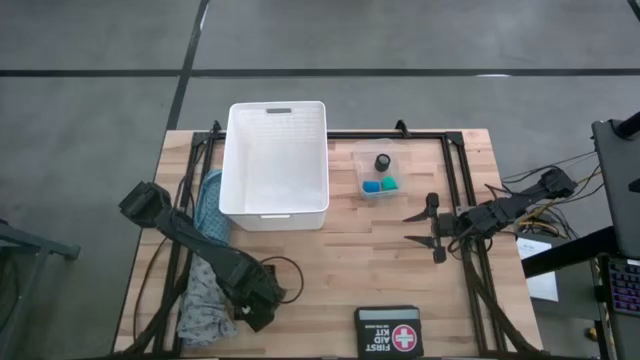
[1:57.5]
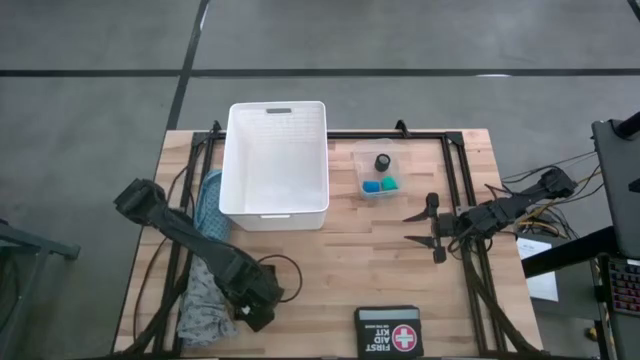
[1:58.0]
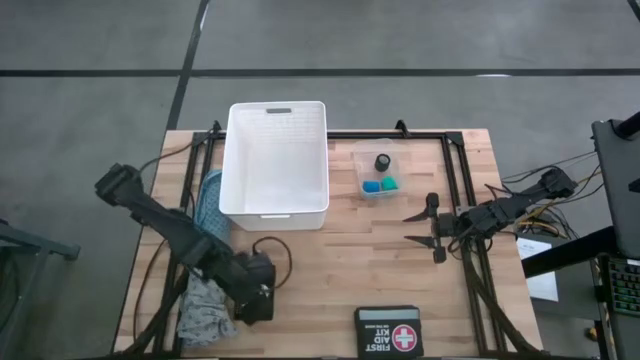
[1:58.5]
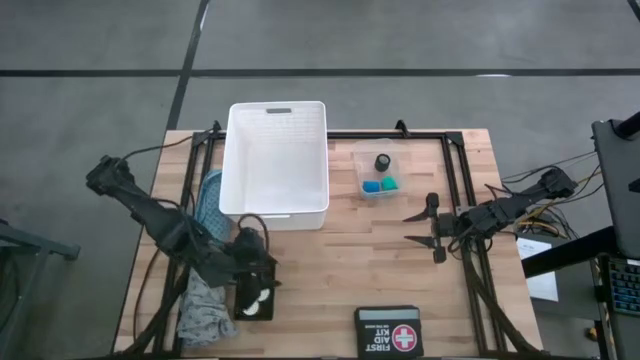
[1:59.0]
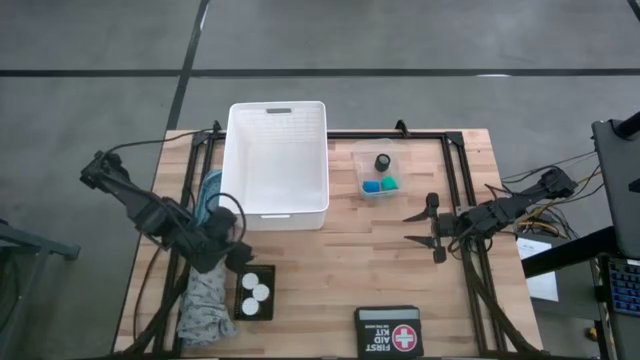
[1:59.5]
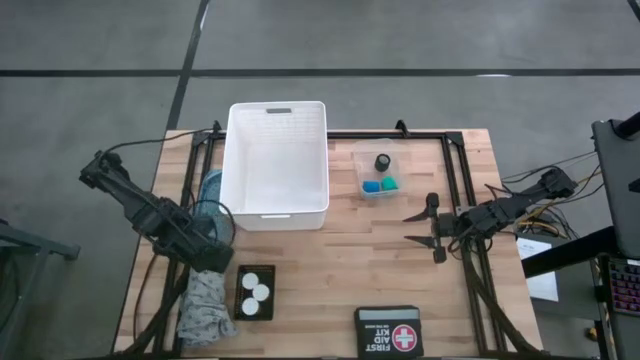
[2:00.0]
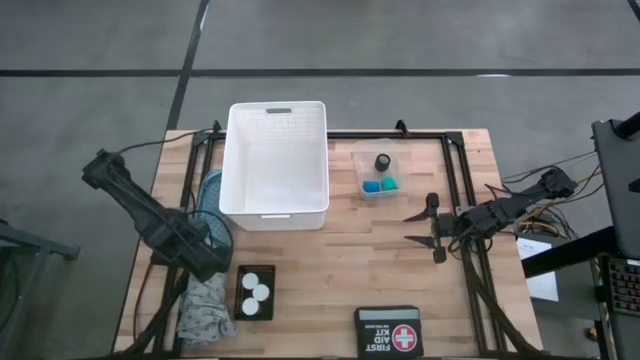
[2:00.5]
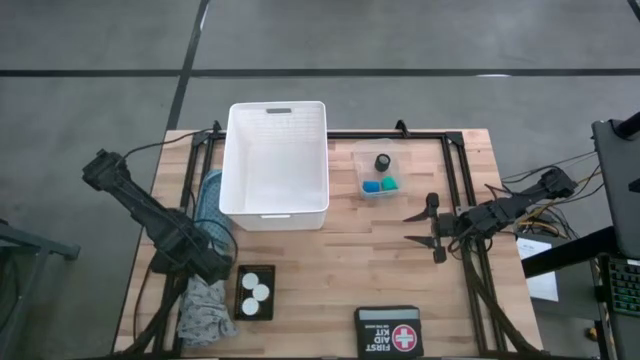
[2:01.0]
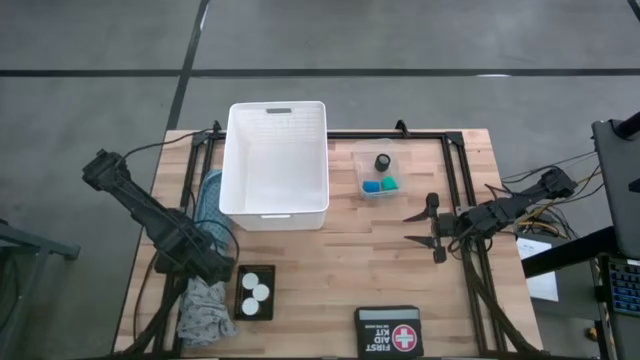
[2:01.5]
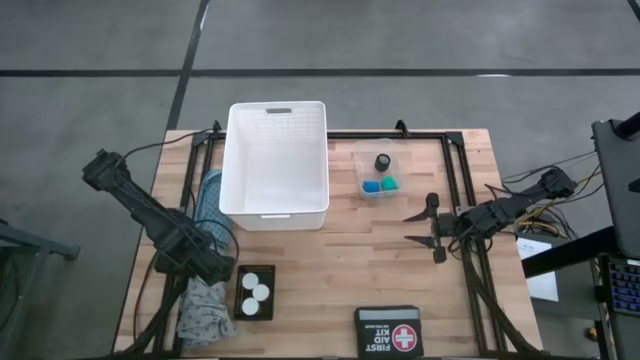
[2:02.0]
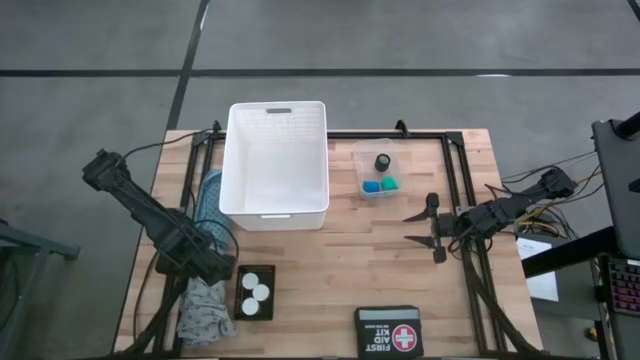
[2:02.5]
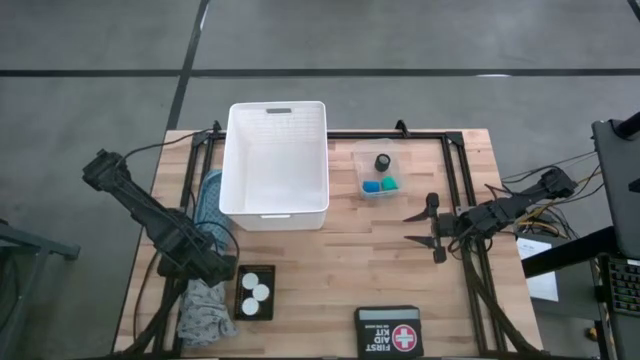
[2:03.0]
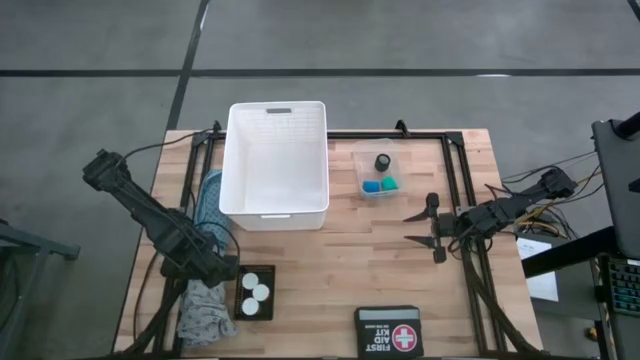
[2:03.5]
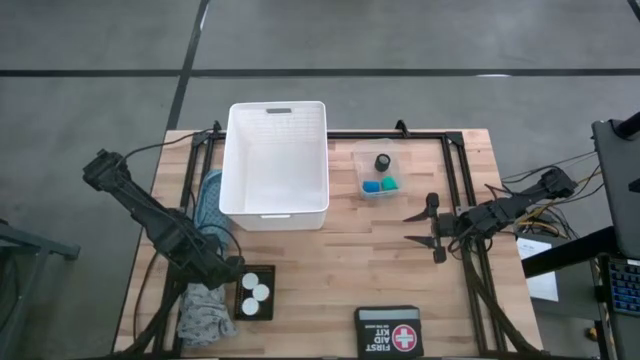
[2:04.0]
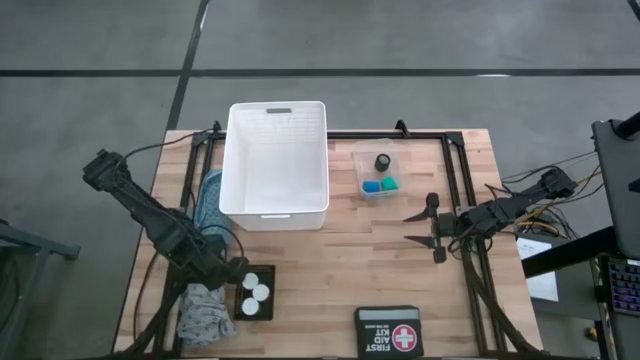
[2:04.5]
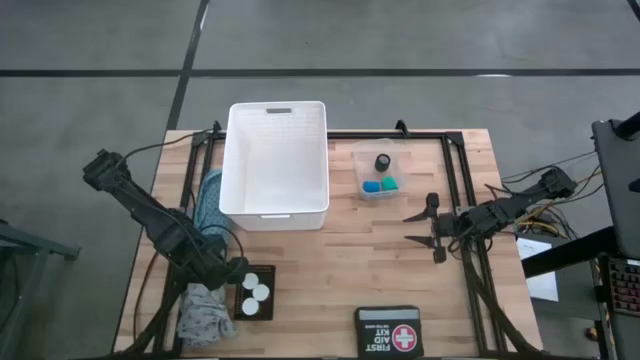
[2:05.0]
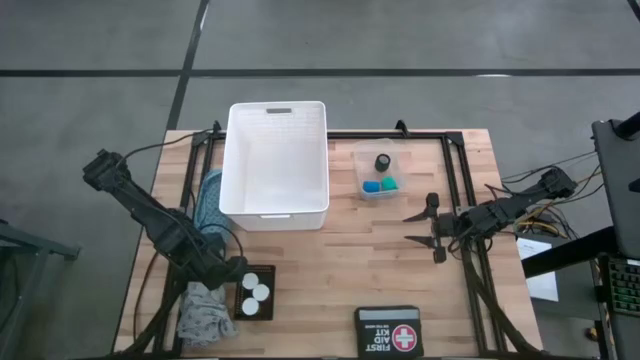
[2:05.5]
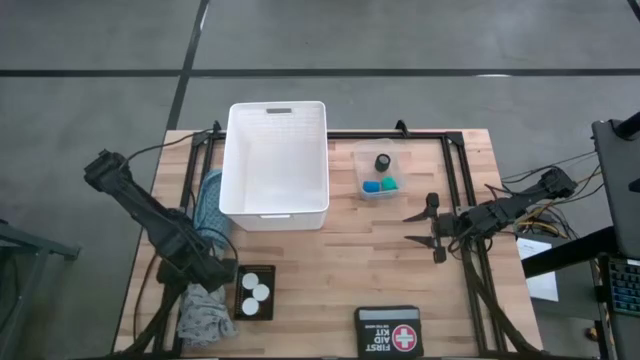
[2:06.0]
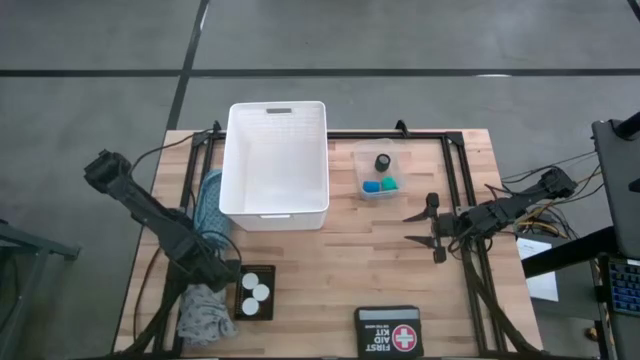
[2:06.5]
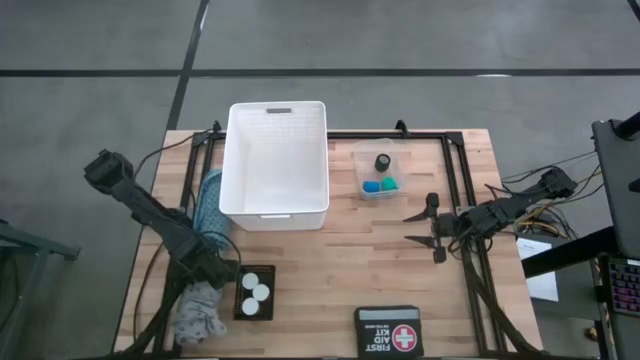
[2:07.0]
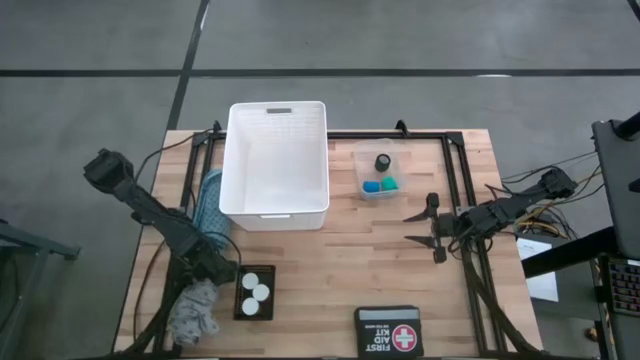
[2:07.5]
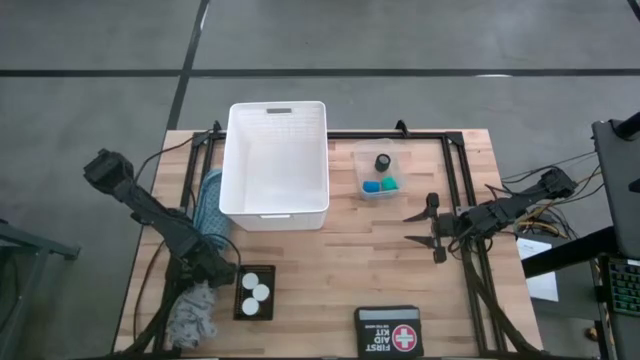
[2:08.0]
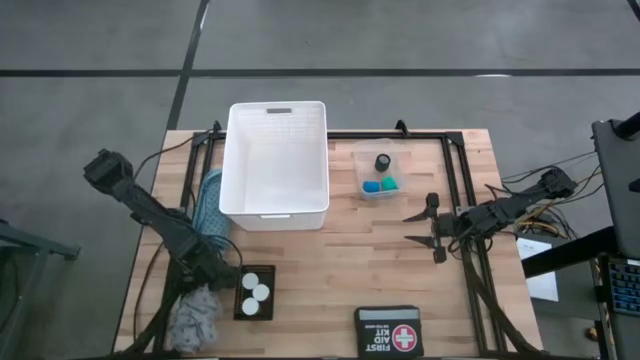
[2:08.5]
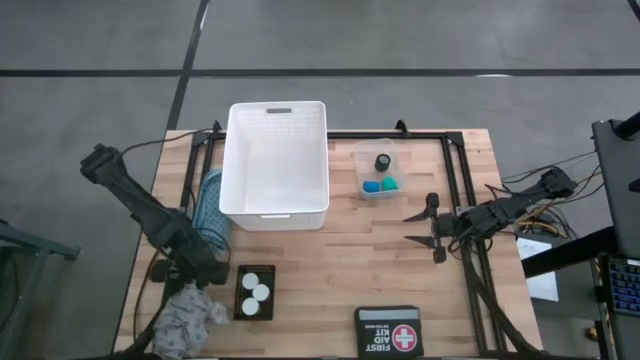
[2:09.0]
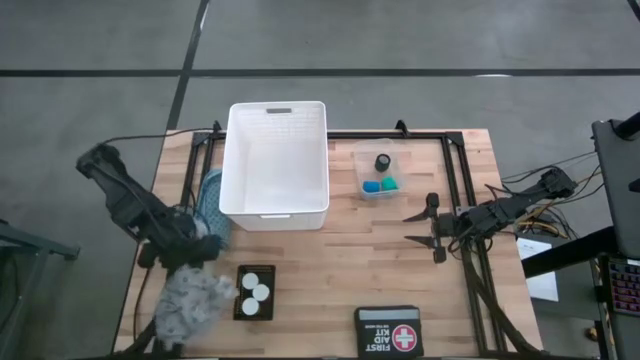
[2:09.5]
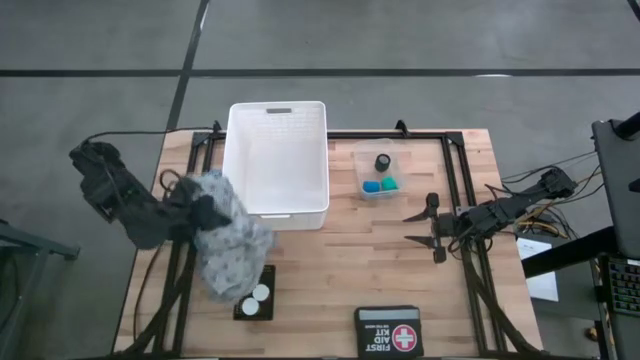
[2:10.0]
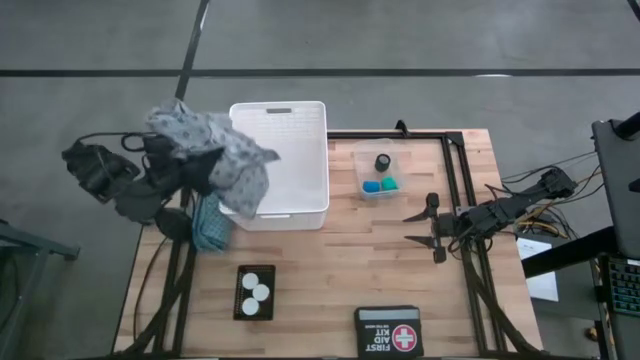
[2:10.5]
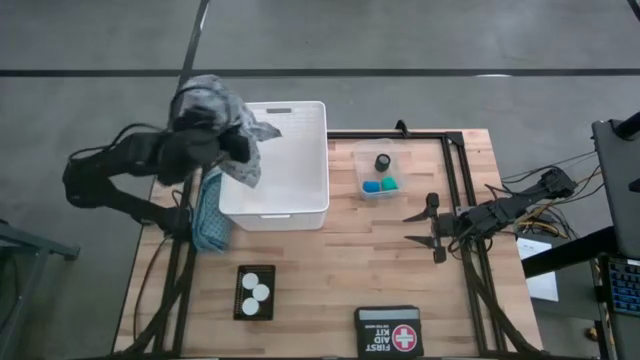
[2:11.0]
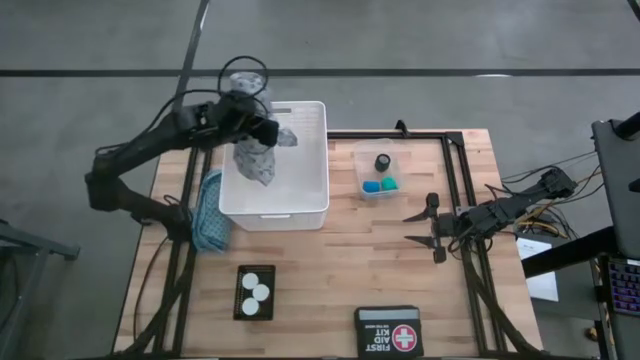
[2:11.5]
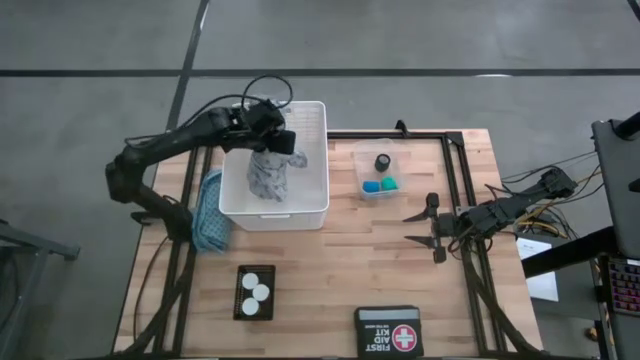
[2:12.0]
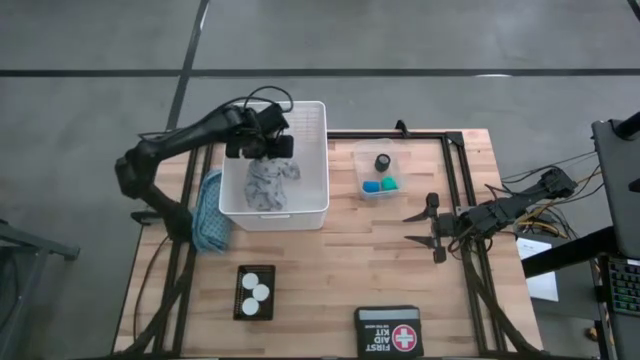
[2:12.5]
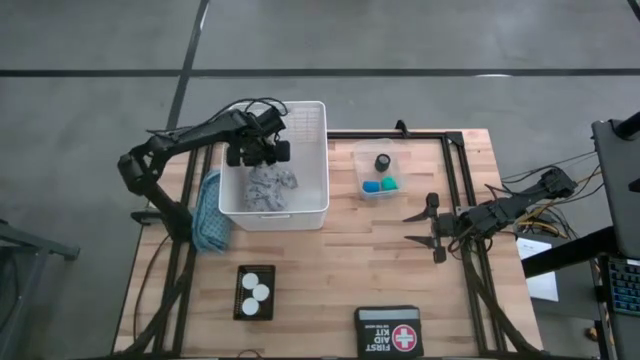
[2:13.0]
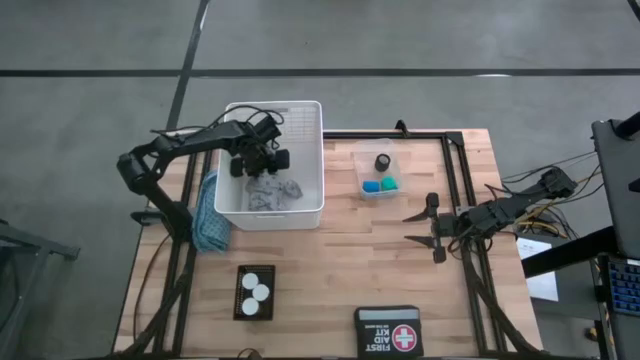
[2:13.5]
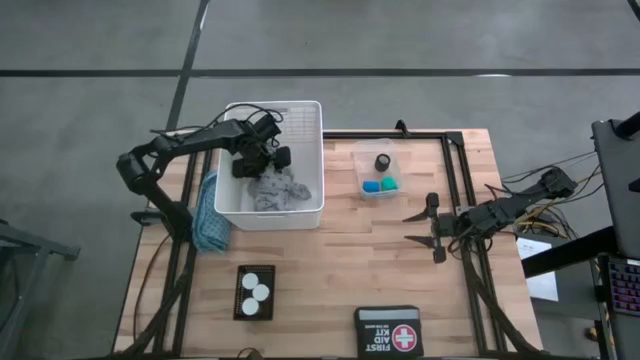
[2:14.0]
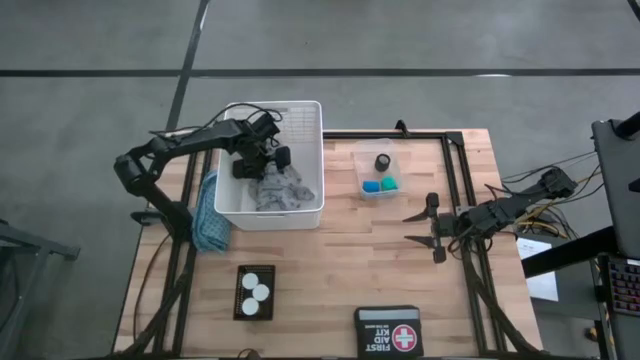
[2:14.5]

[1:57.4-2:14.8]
Task: Pick & place medical supplies in basket/bin
Put the light gray patient gown into the white bin

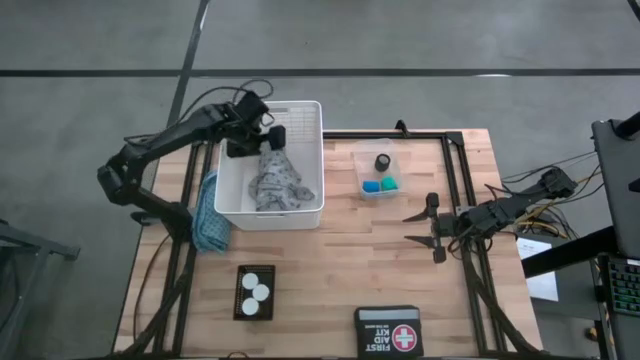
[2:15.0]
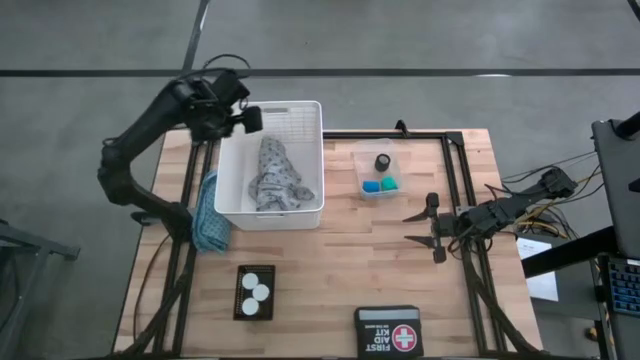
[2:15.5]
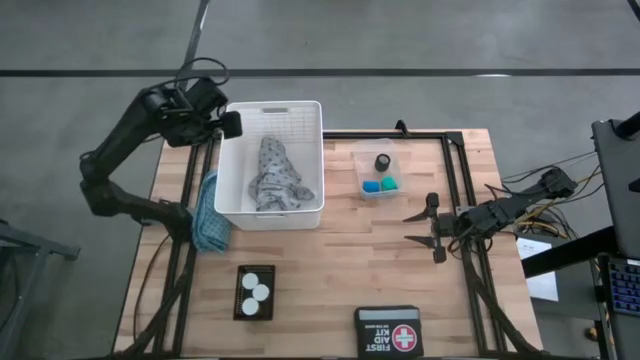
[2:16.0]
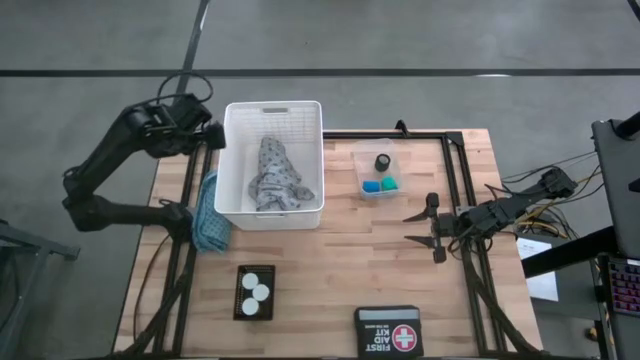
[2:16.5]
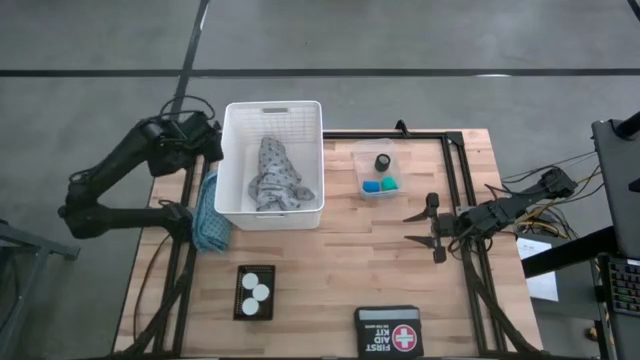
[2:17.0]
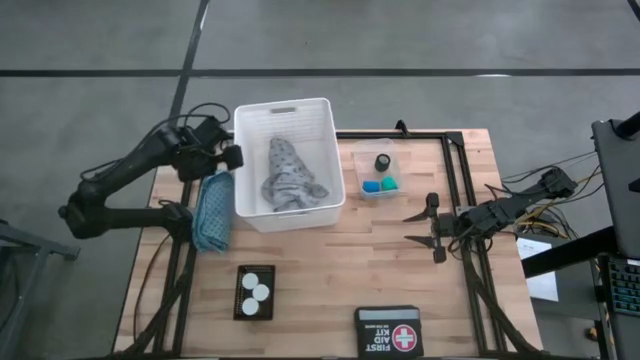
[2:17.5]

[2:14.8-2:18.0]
Adjust the white bin

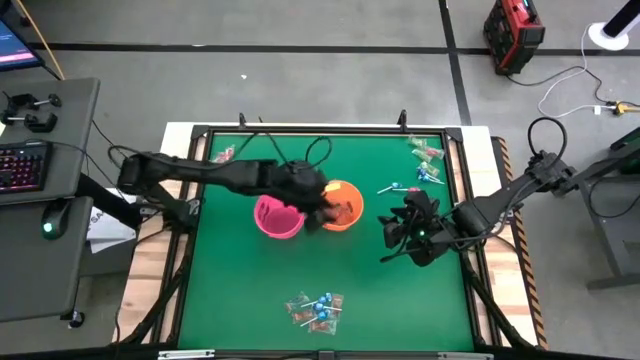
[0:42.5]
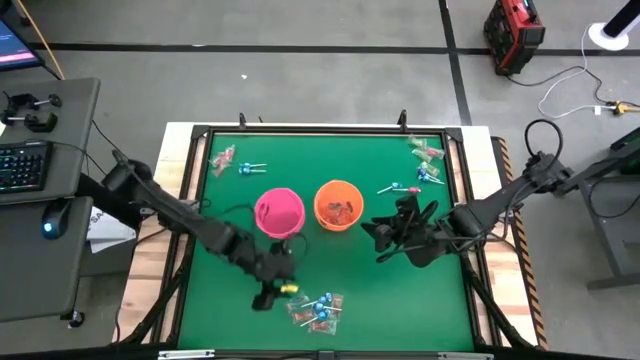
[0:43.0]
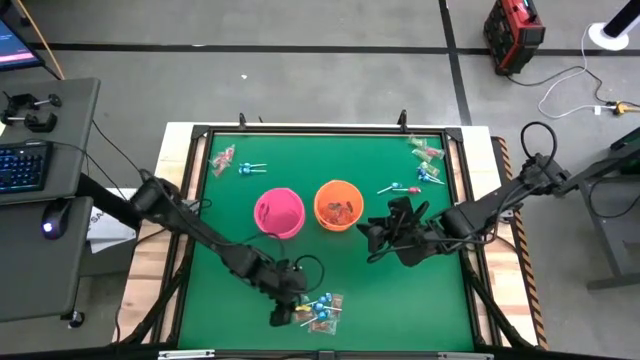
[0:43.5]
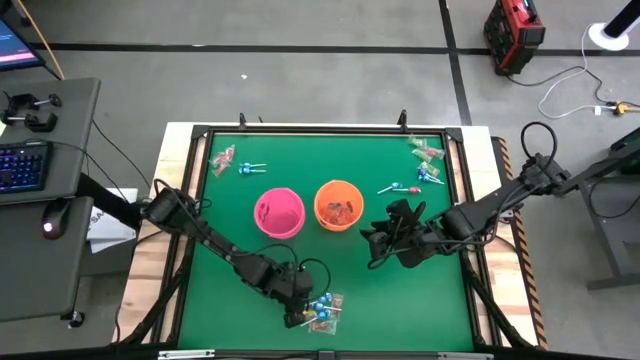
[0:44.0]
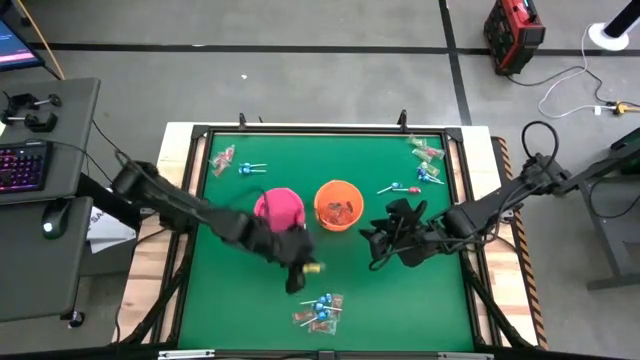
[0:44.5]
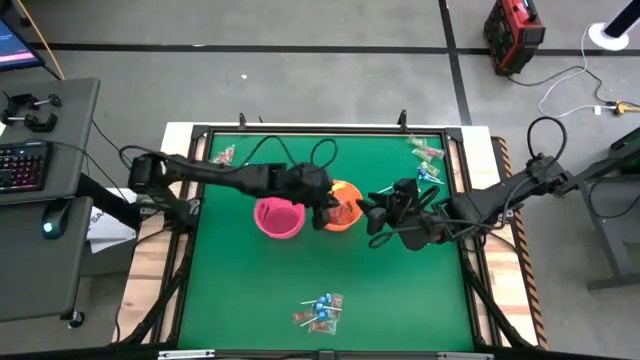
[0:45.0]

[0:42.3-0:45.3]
Task: Sort candy by brand, put in halloween buckets
Put the blue gummy into the orange bucket
